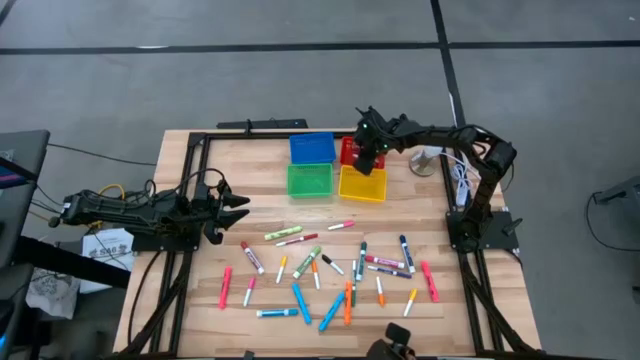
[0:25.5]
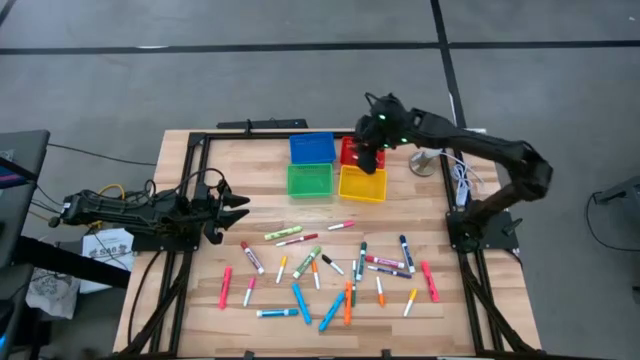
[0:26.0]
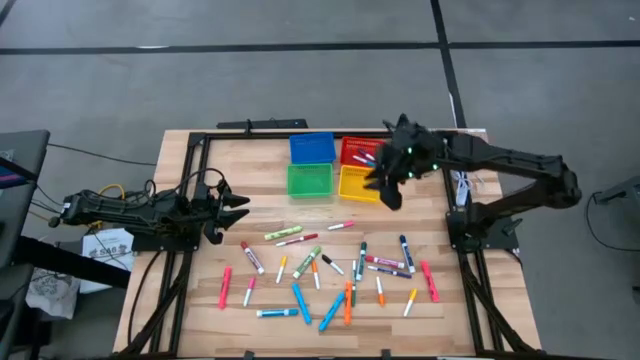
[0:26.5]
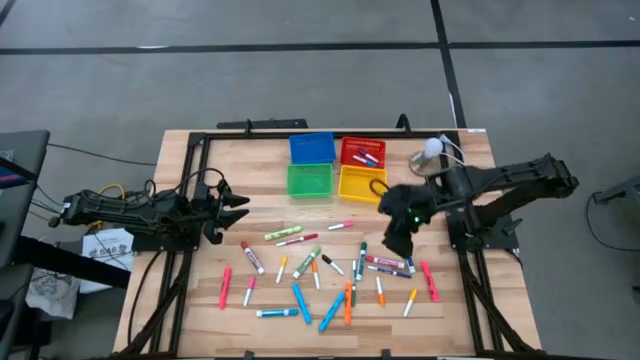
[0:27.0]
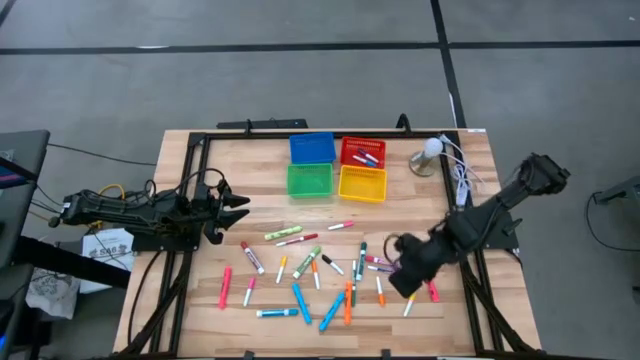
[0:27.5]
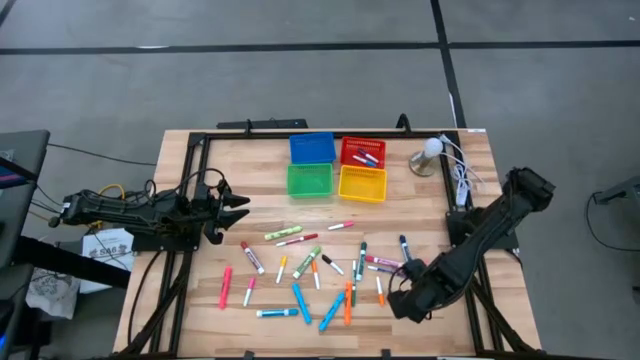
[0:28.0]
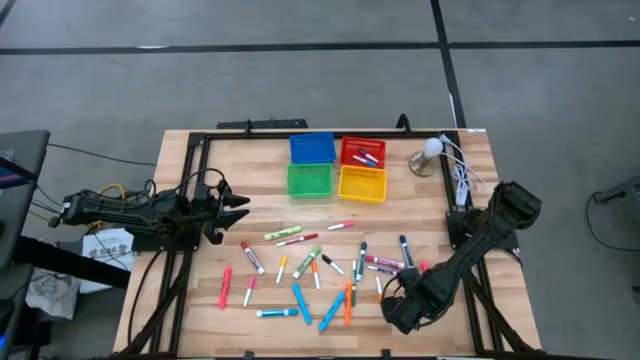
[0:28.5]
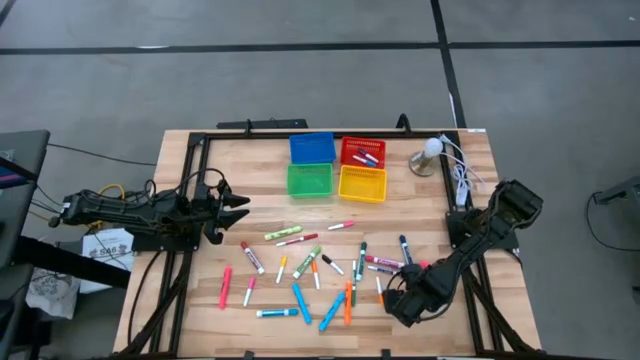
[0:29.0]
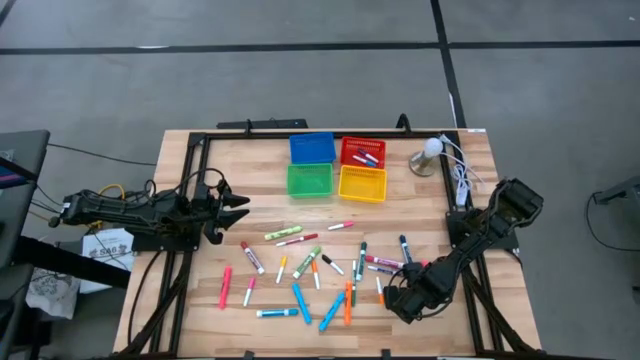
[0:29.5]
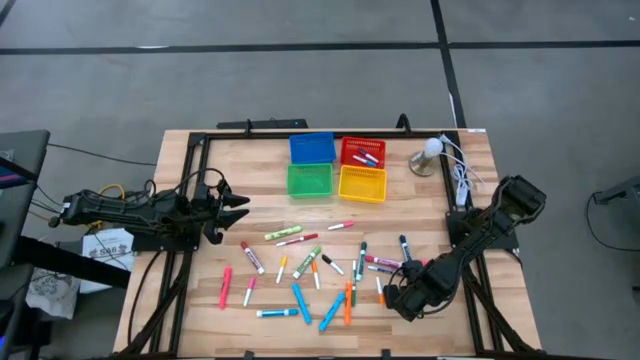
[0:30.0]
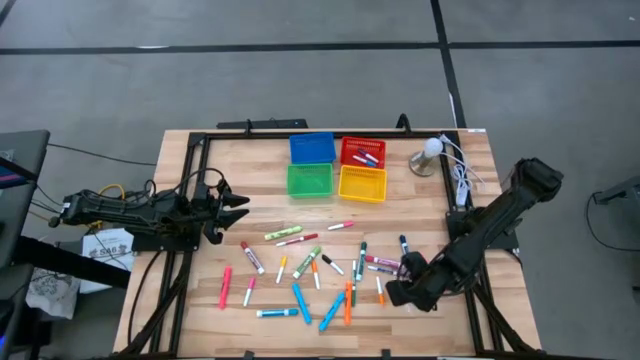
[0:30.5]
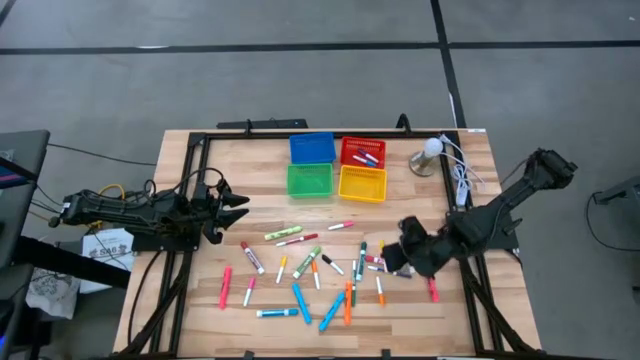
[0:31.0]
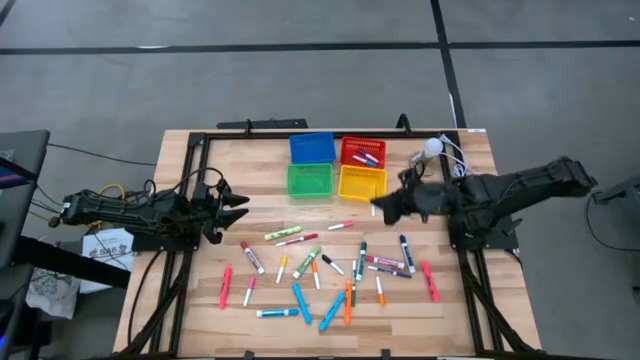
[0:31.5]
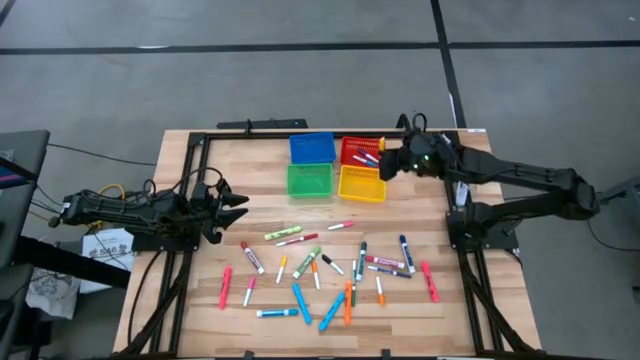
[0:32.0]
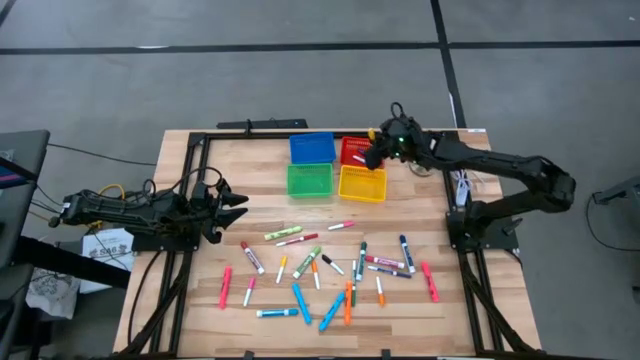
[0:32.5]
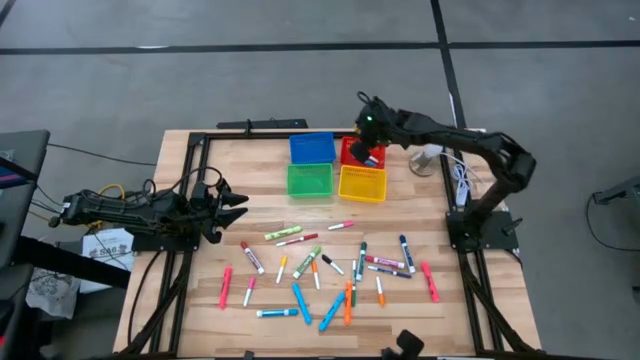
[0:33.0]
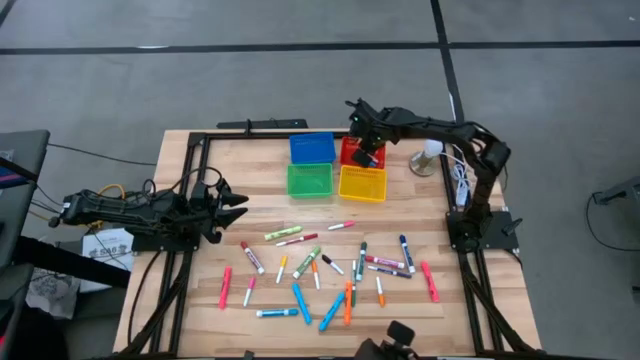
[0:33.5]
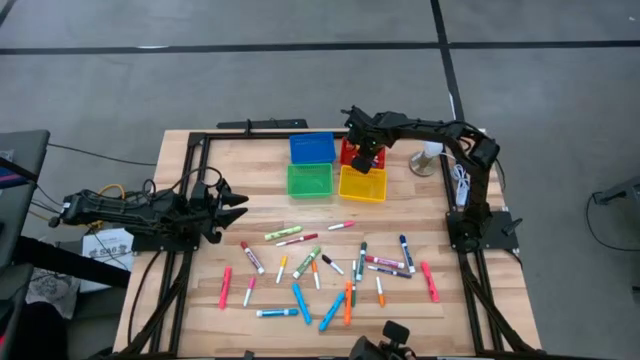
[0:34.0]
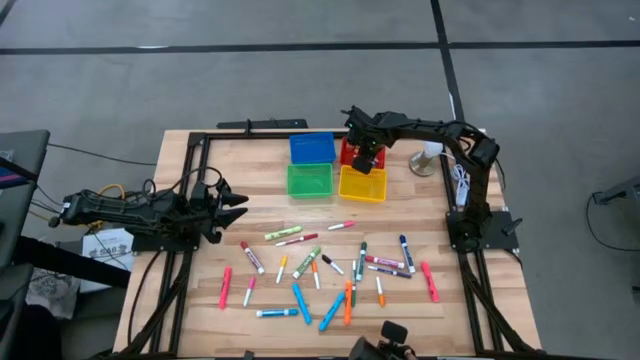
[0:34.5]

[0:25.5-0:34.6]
Task: Pick & Place Markers
Put the right yellow highlighter into the red bin

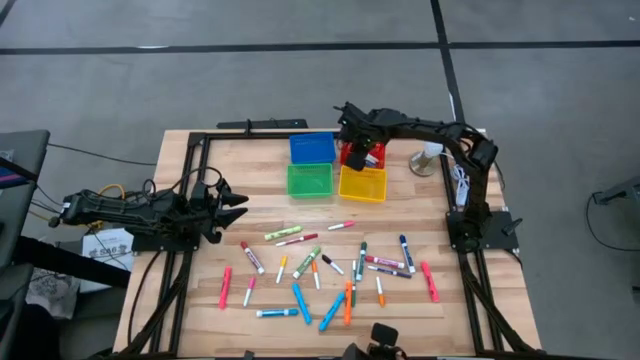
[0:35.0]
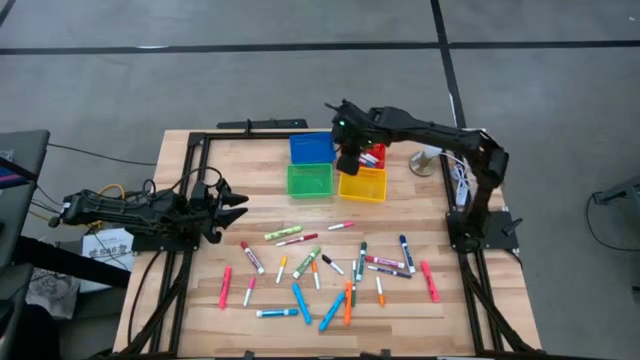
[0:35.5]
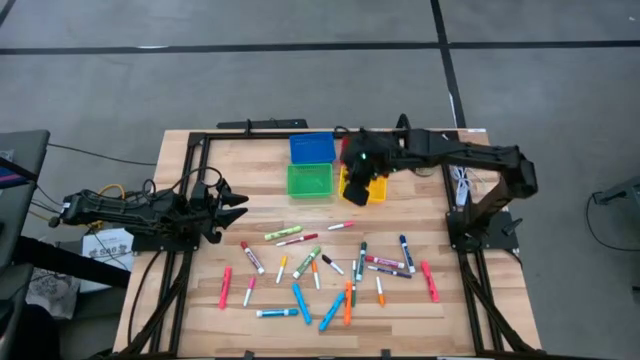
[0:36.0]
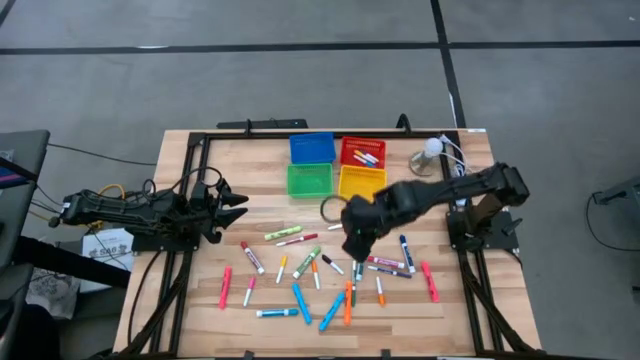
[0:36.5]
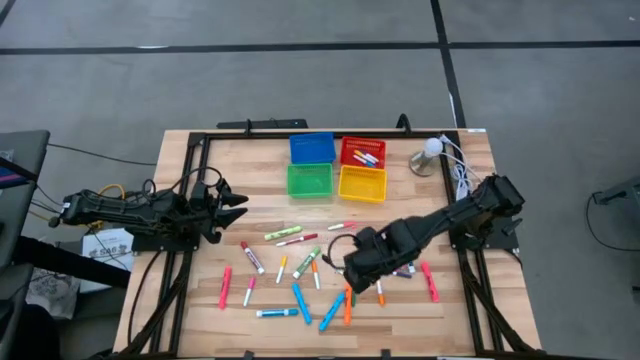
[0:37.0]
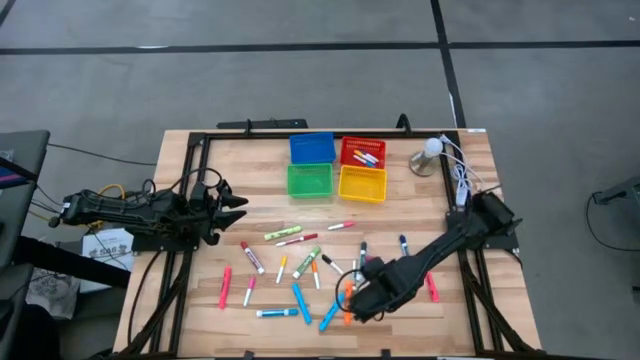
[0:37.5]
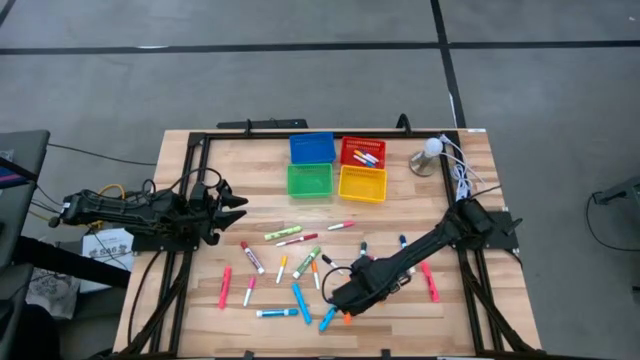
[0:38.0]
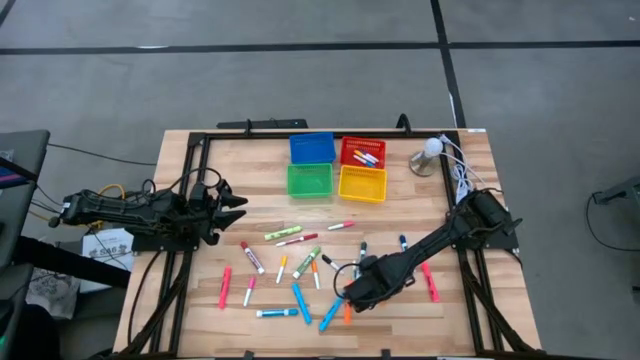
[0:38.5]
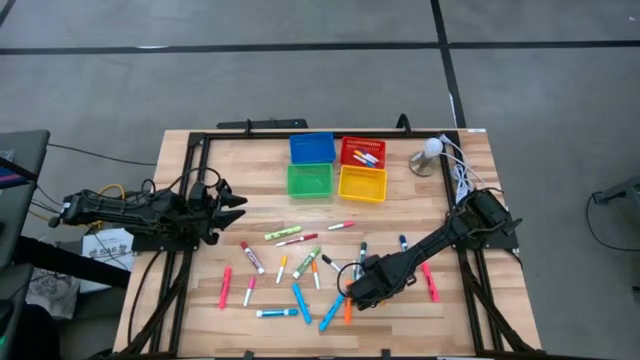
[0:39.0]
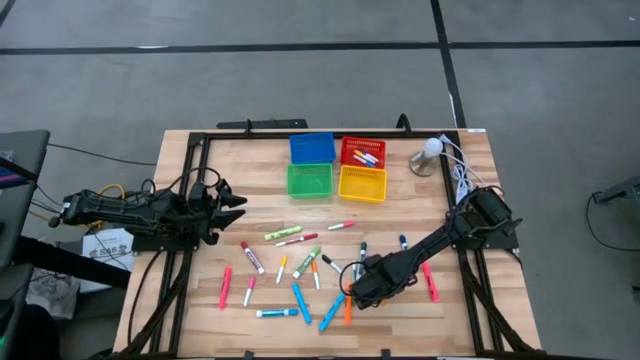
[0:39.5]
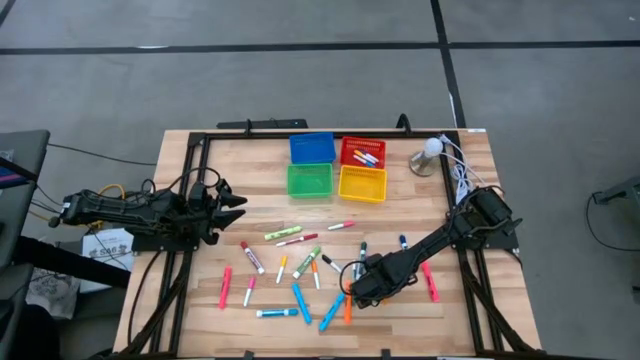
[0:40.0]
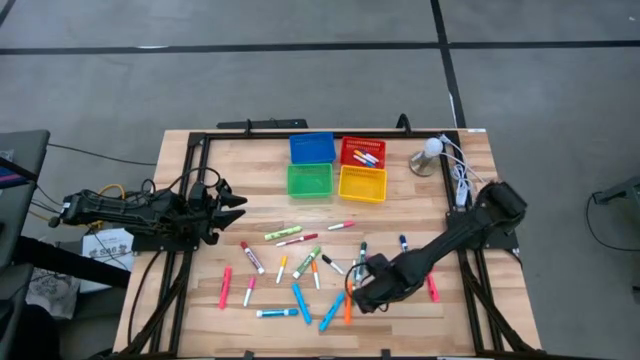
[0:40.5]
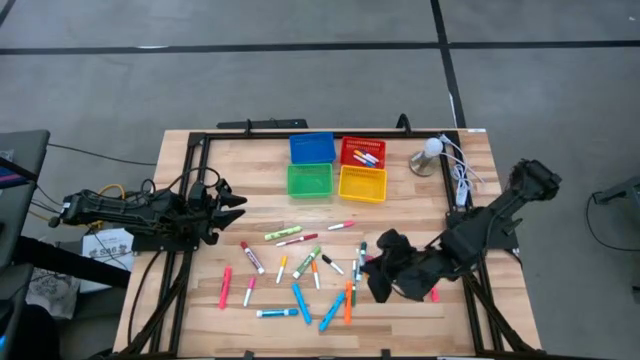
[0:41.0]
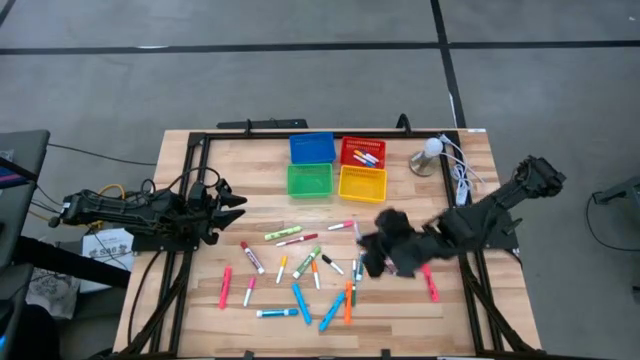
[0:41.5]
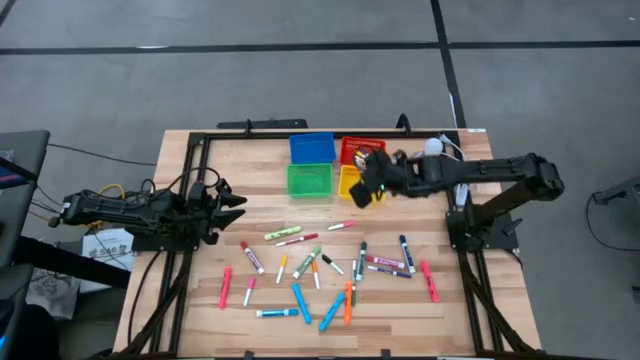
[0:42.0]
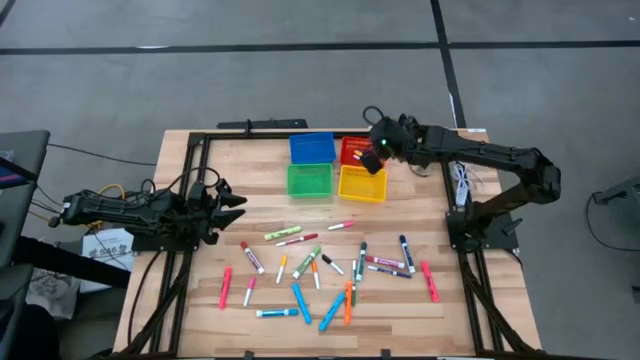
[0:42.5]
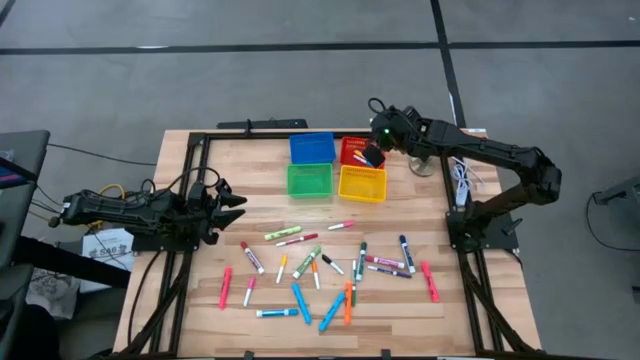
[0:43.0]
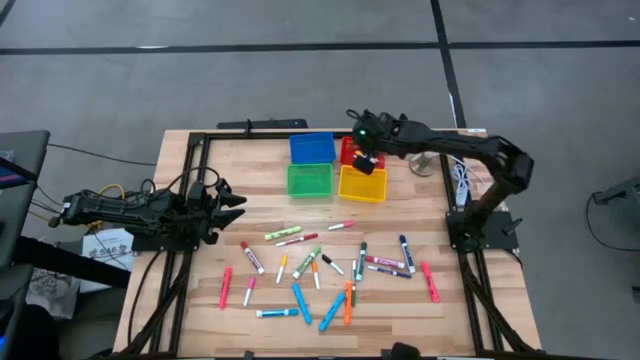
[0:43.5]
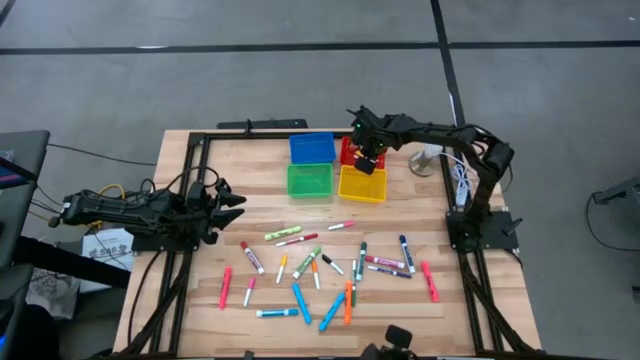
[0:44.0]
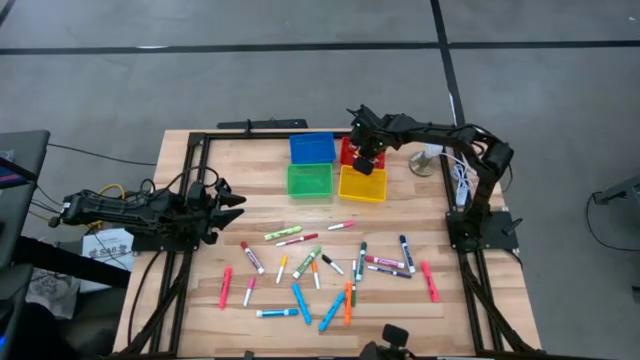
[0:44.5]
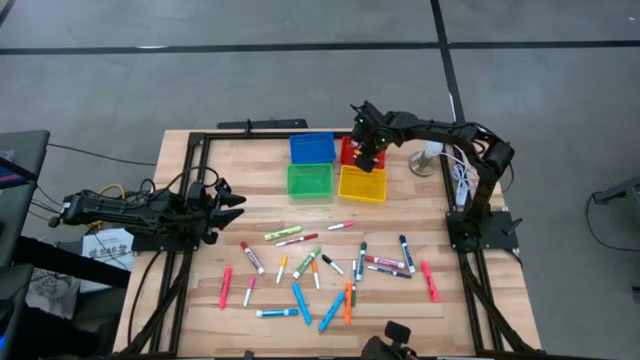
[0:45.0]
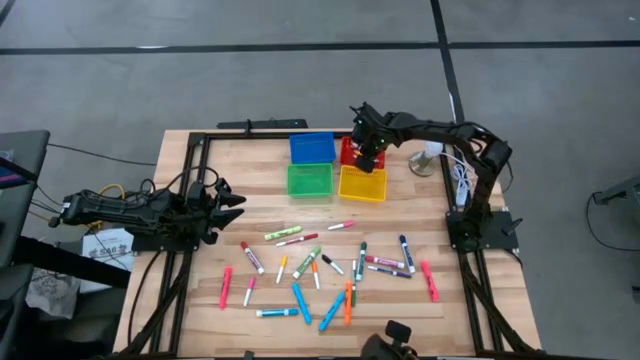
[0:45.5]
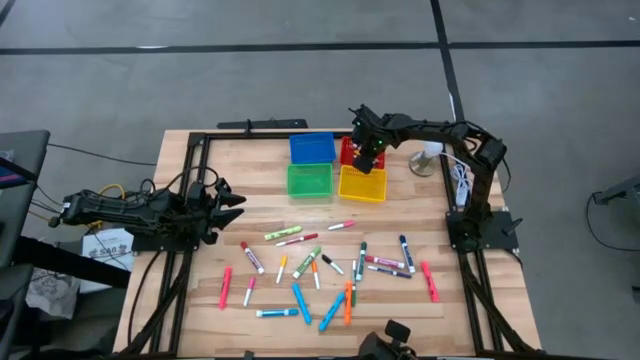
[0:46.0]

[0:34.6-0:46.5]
Put the right orange highlighter into the red bin
